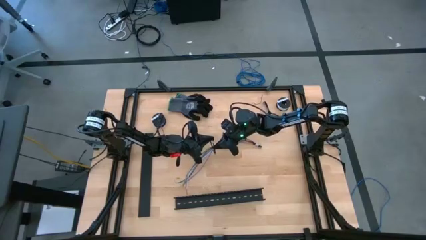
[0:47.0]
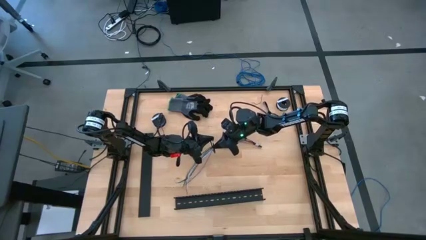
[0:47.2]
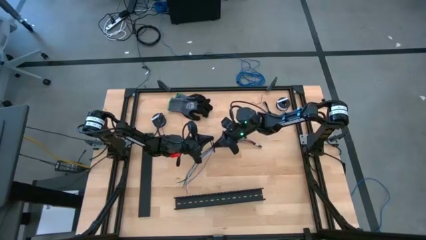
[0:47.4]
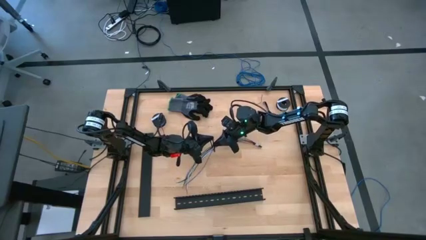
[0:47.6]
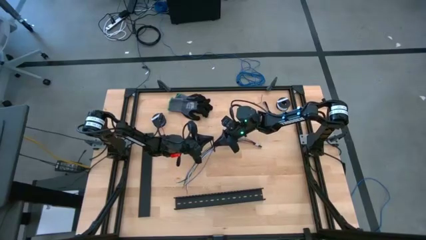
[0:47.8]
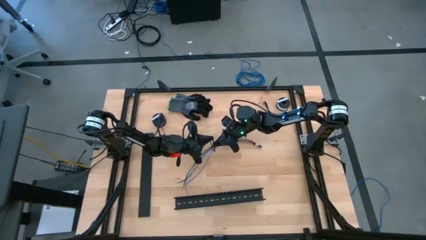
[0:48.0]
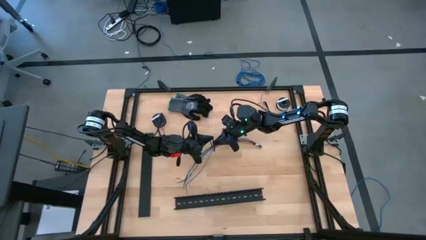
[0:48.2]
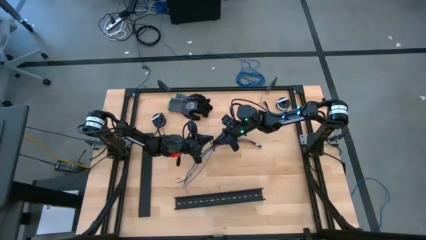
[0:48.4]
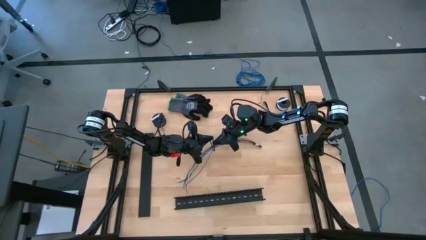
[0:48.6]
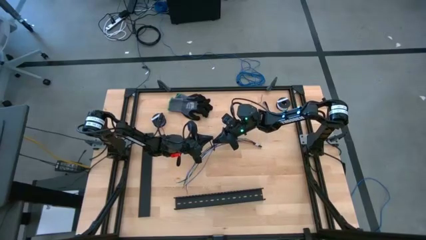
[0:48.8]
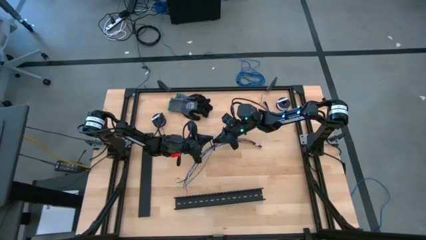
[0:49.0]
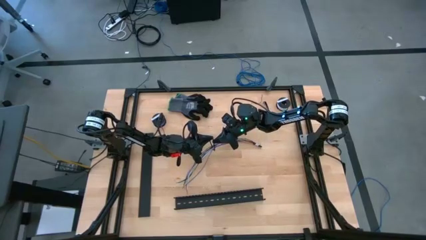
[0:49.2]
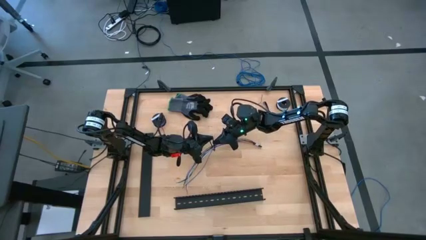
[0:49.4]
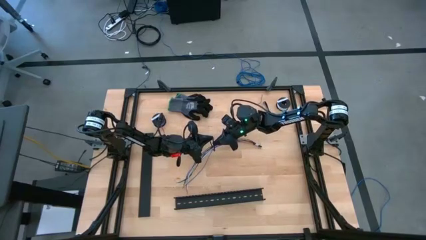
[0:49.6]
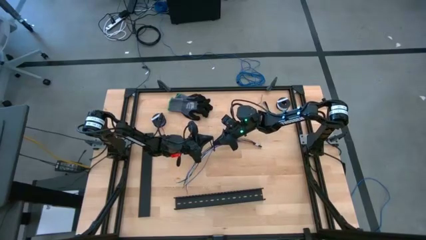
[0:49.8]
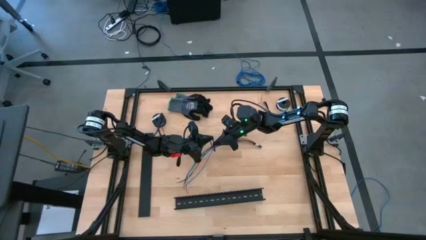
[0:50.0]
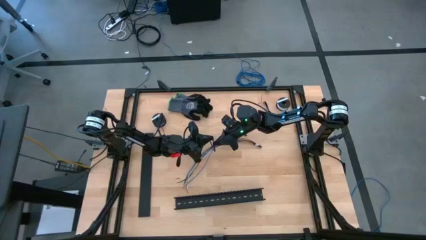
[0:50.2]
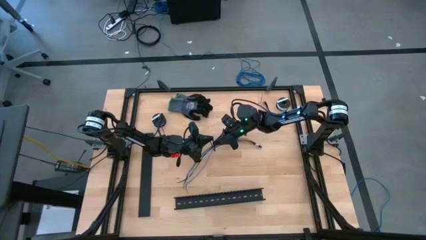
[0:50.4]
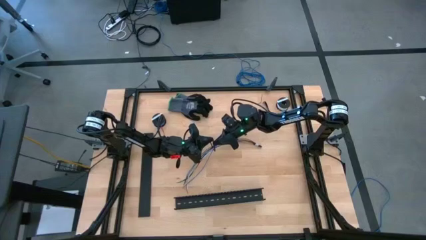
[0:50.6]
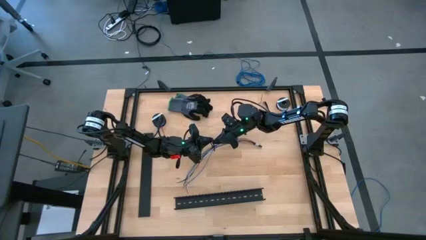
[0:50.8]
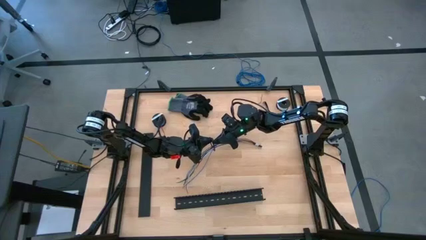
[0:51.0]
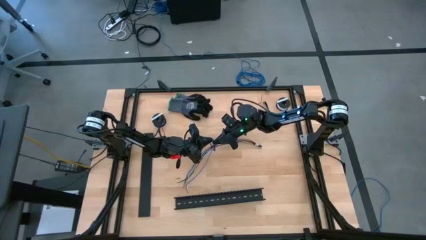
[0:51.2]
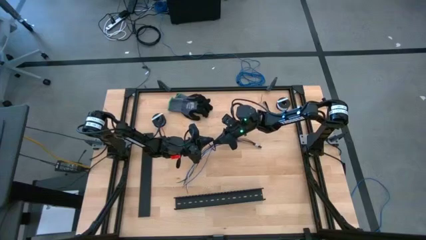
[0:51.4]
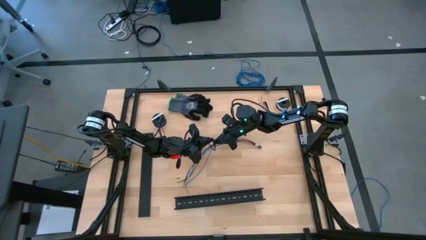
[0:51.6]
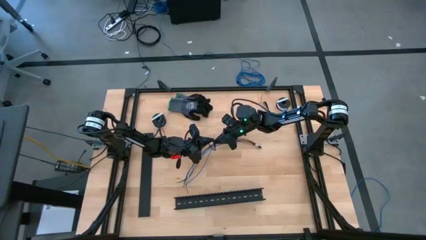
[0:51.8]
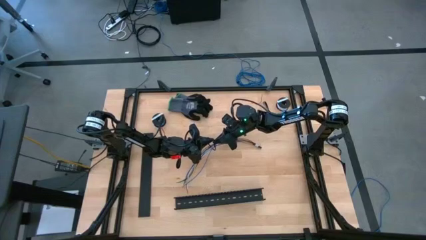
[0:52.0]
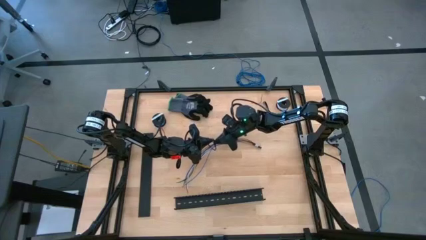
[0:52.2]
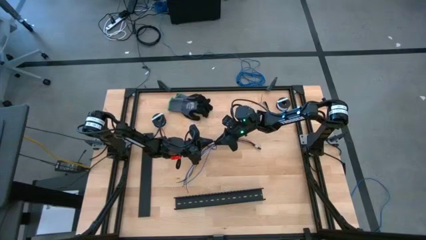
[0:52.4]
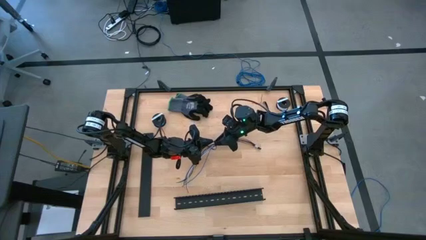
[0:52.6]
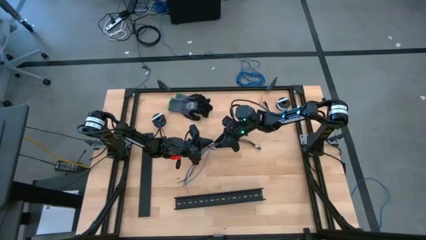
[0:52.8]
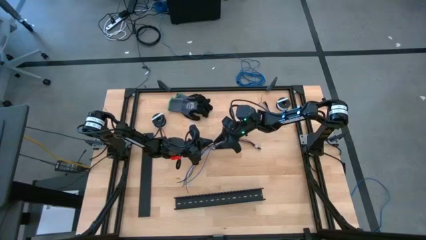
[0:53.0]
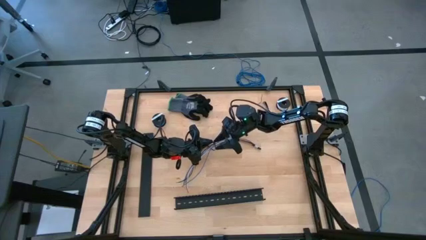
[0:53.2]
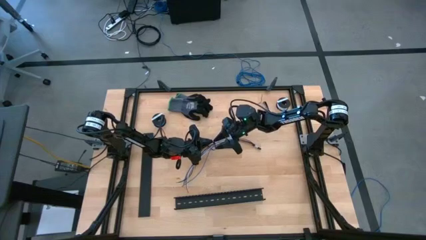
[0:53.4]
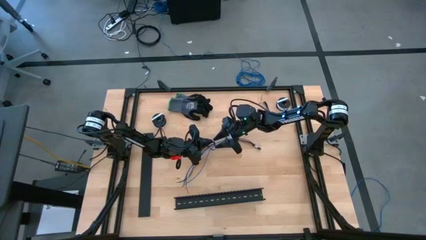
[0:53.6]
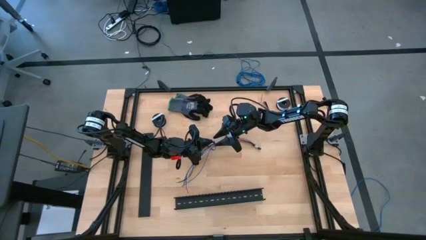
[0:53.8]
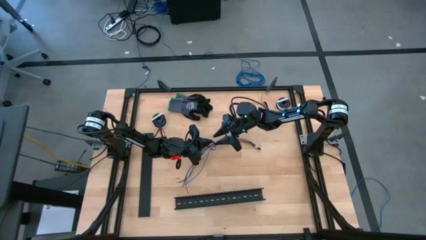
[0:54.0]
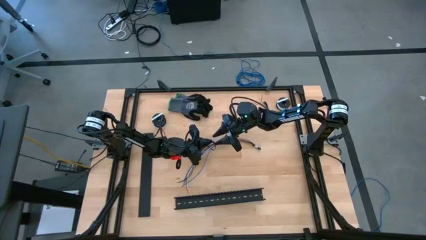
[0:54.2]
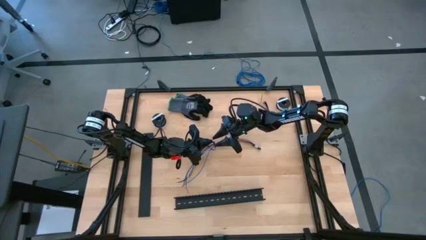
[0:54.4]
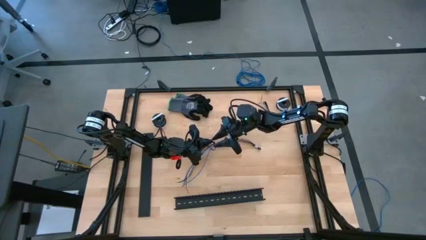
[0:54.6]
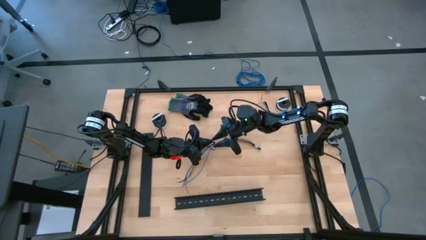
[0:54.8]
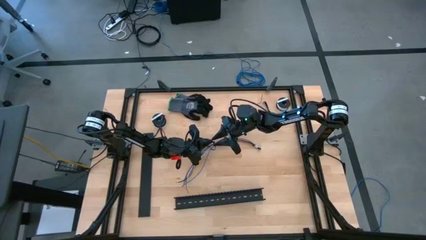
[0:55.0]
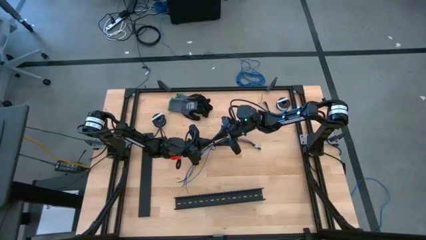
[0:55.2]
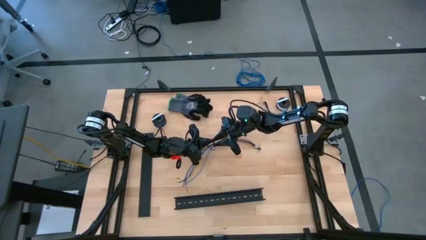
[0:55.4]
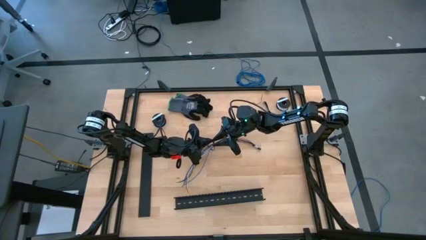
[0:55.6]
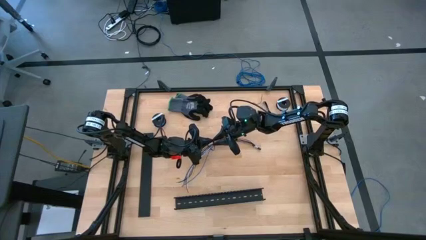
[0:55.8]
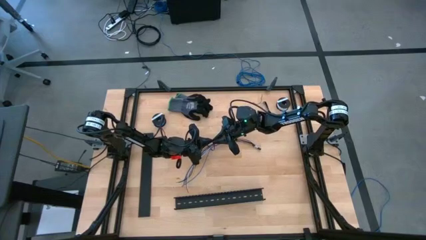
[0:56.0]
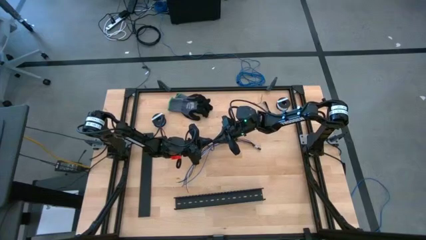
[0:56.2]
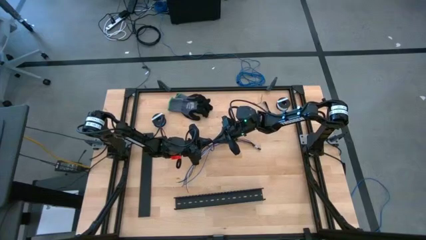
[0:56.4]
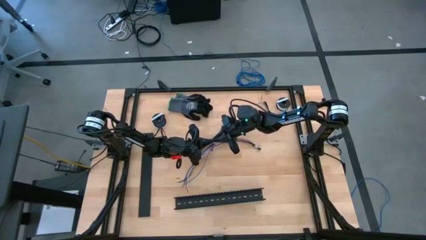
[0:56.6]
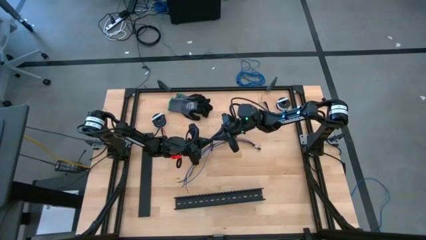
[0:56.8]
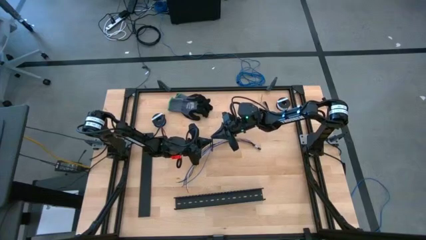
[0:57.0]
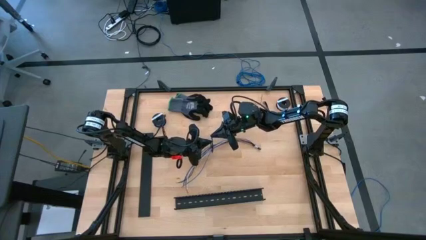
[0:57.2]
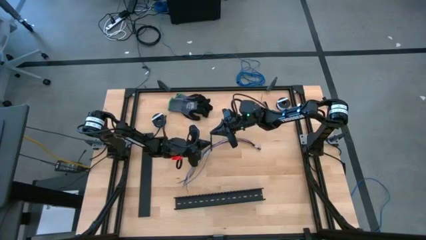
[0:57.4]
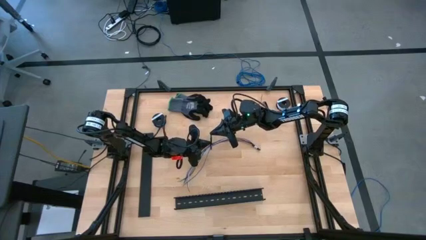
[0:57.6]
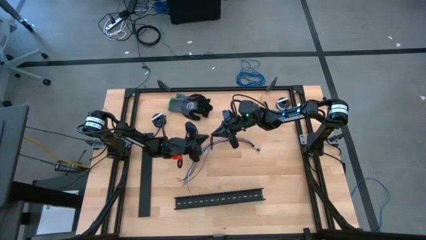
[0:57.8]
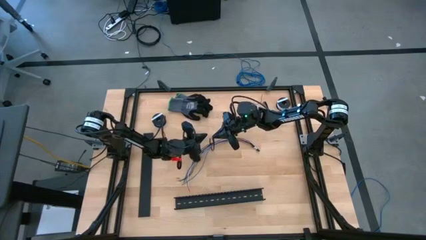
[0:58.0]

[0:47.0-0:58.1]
Task: Ziptie cables
Wrap the cables together using the black zip tie
